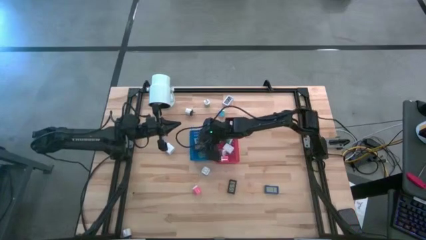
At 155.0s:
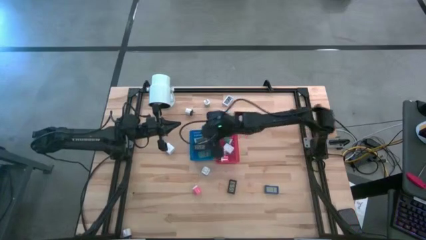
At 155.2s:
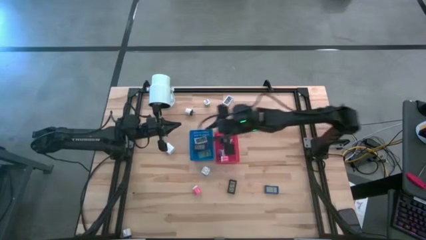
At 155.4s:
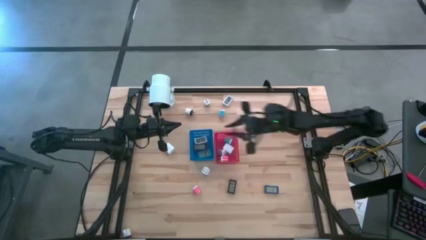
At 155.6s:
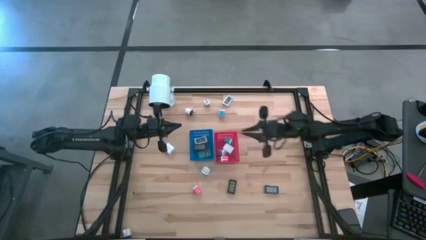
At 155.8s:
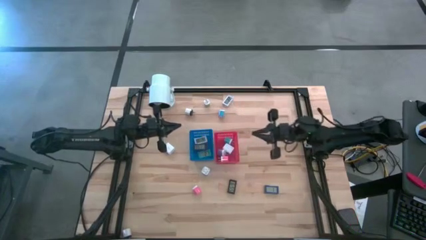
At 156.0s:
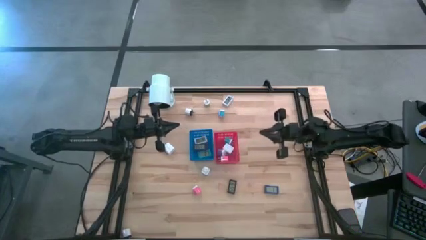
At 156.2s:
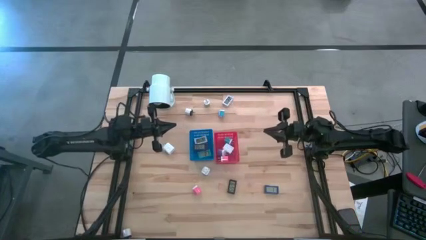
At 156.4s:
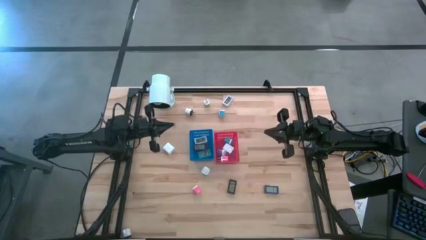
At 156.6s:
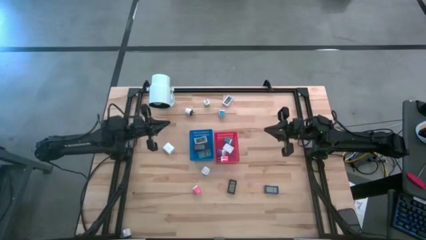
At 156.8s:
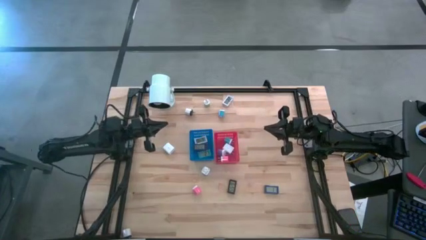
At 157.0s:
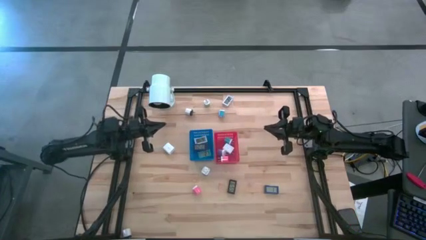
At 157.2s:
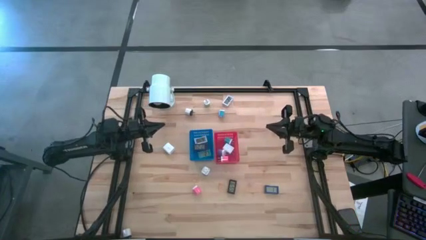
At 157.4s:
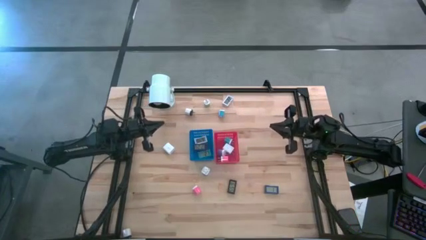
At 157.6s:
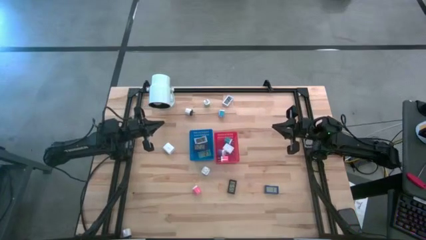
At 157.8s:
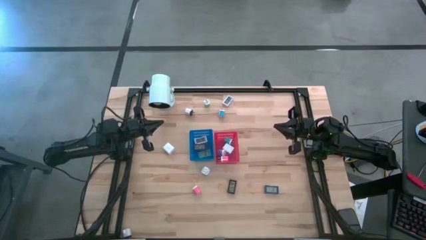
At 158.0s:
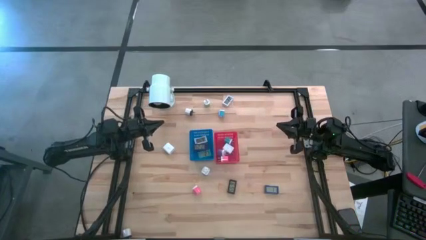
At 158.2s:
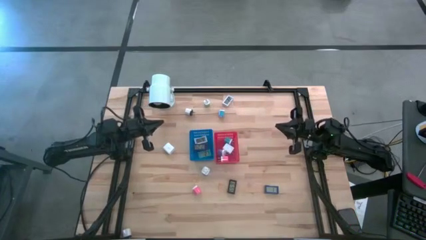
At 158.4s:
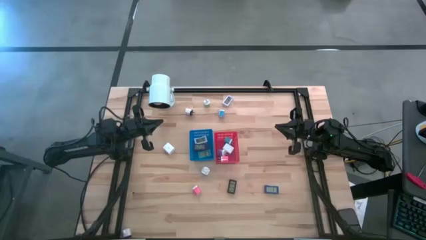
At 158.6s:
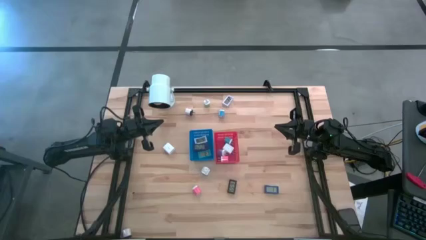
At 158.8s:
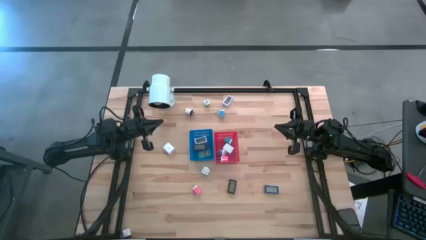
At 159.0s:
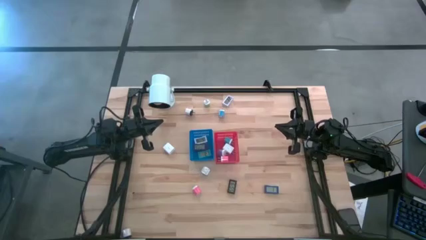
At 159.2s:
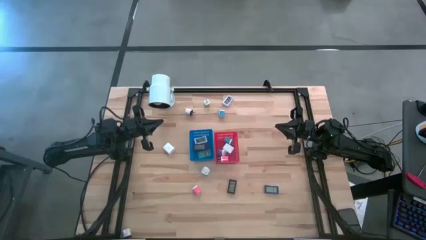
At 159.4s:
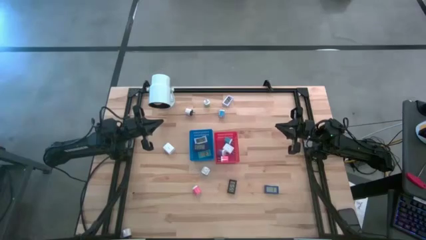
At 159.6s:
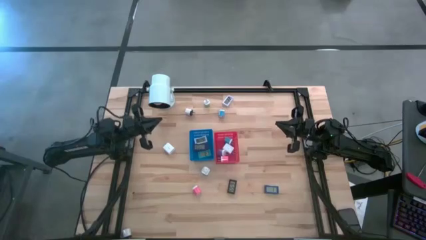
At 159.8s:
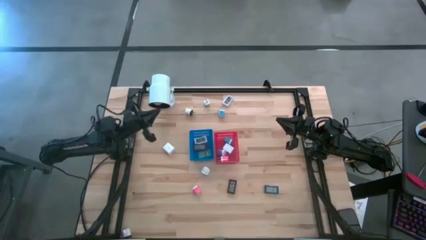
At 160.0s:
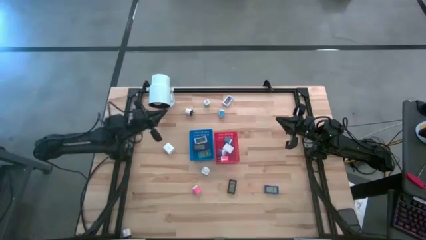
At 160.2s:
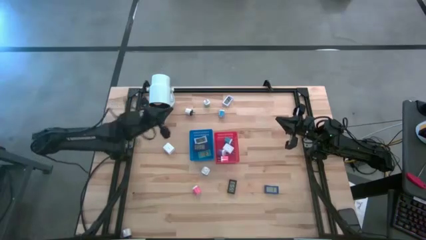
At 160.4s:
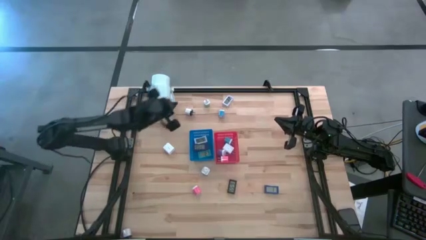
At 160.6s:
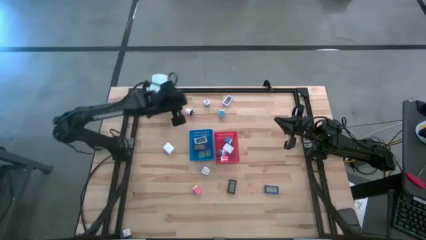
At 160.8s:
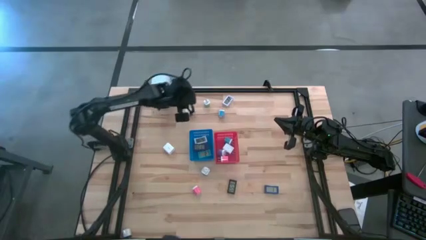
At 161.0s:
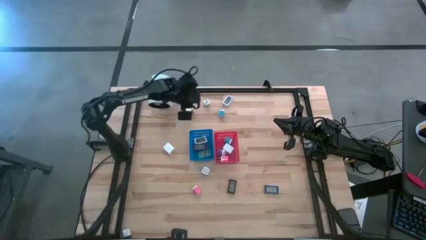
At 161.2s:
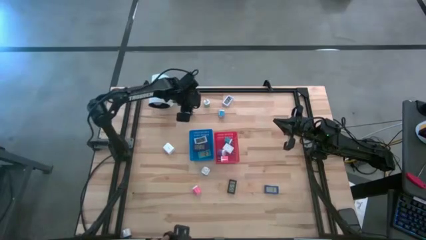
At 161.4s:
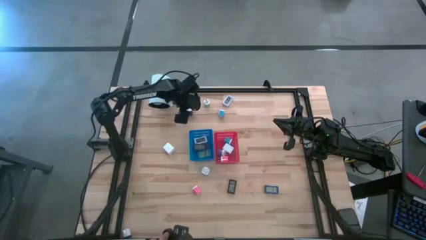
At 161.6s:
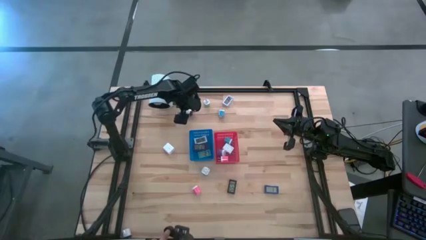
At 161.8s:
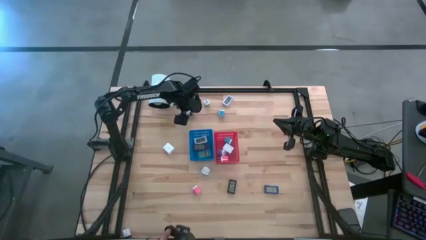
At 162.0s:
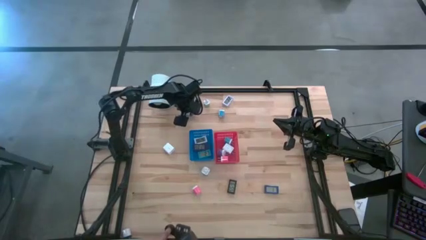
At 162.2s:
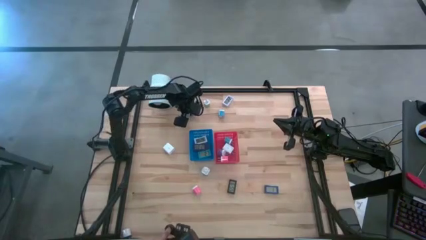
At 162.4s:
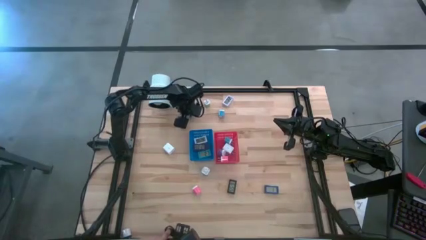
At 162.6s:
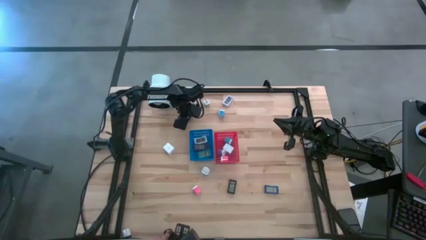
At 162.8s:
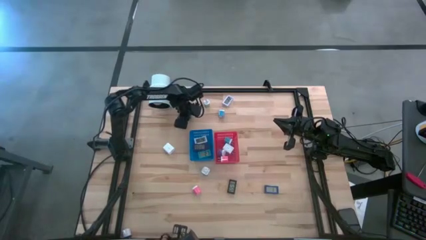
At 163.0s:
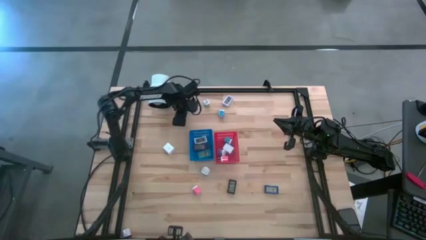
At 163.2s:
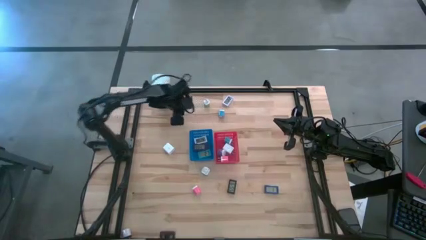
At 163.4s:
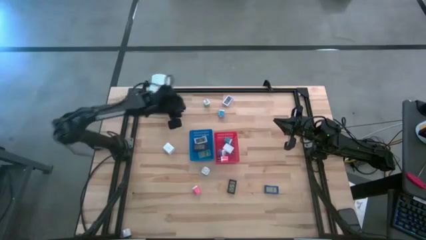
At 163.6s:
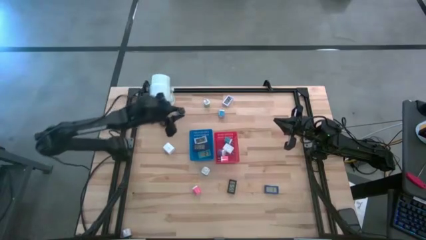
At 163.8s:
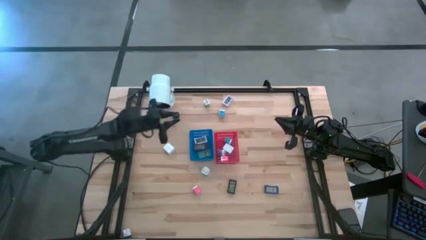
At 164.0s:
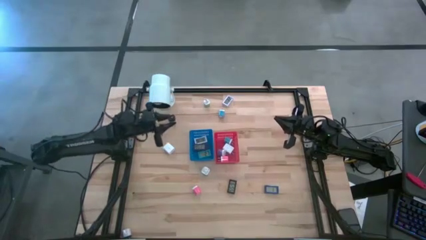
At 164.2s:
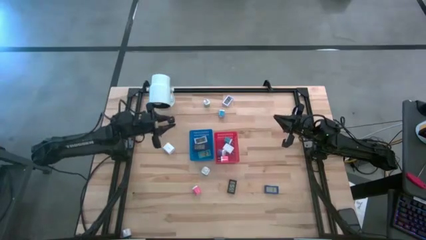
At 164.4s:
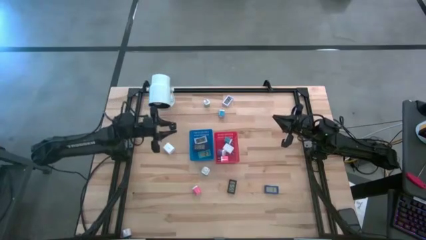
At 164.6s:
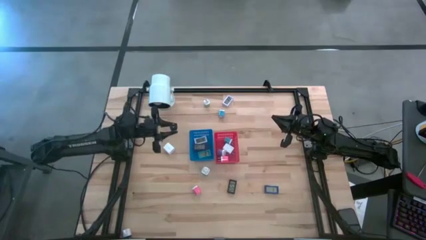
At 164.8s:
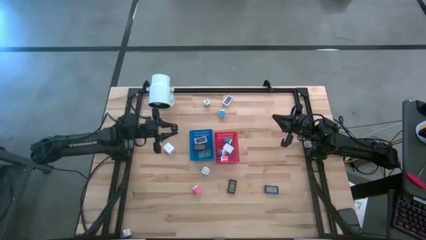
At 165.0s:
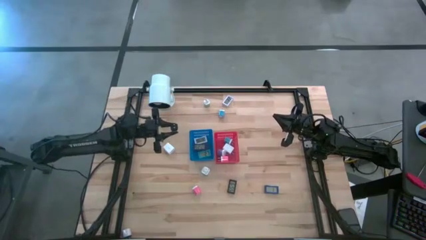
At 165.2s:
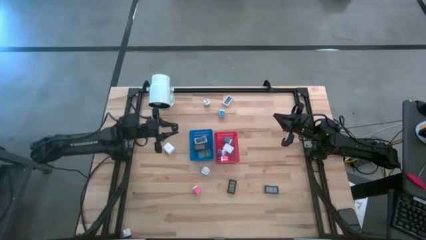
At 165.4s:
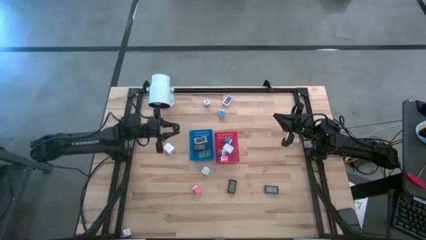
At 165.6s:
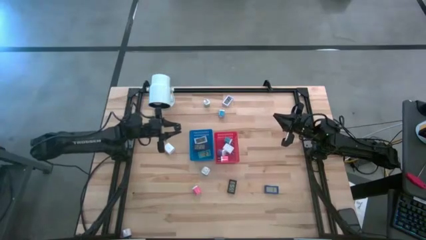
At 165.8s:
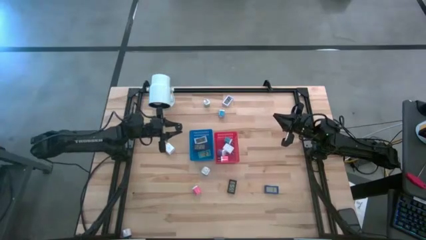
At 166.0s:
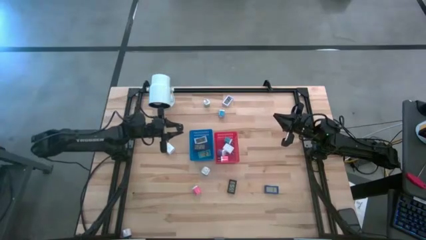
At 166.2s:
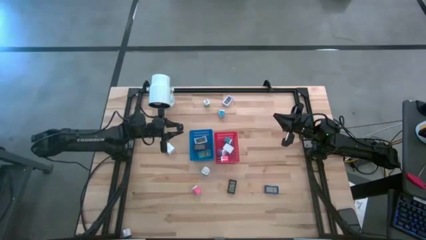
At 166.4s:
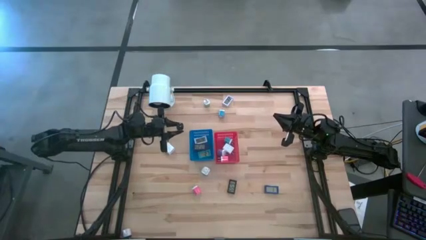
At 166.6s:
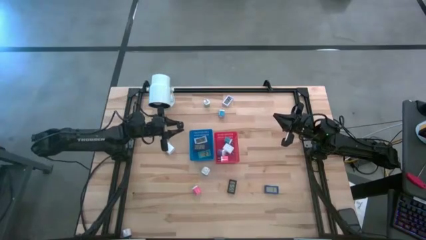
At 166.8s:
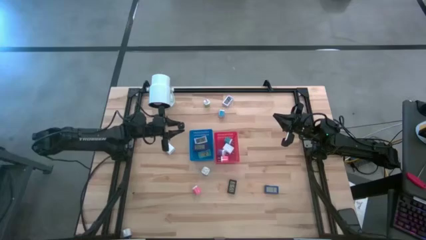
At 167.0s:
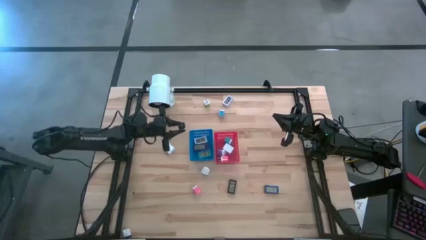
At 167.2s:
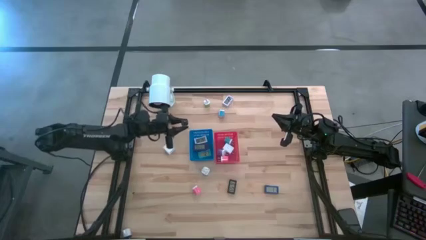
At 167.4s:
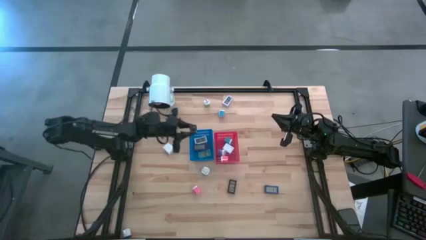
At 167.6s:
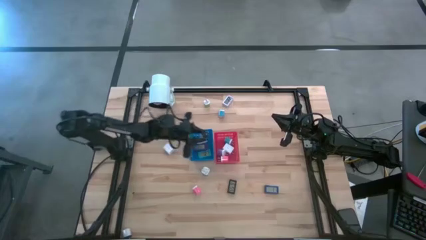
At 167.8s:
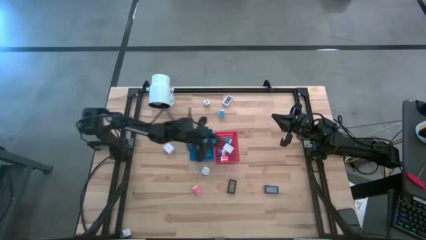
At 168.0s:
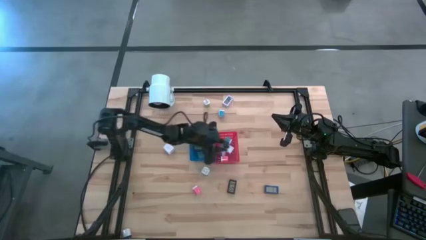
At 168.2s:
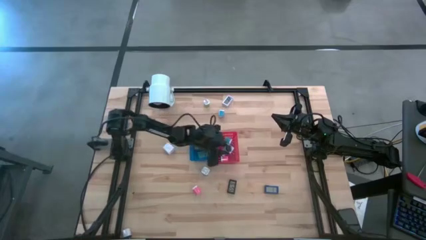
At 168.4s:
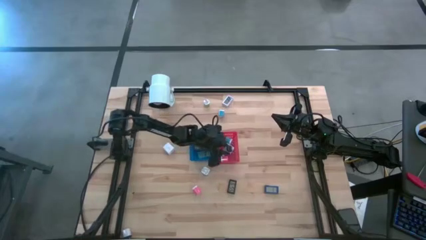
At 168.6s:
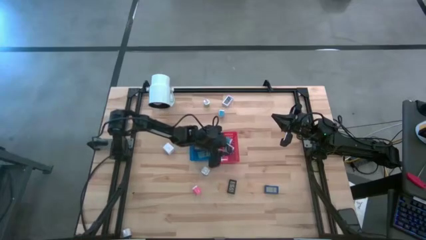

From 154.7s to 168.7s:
Task: Pick & Place Office items
Put the white charger adapter into the red bin

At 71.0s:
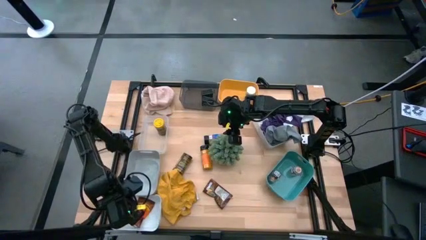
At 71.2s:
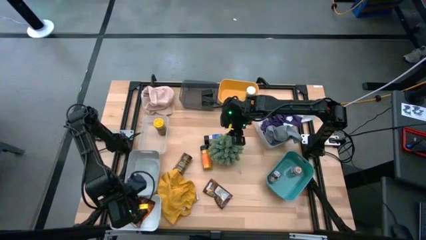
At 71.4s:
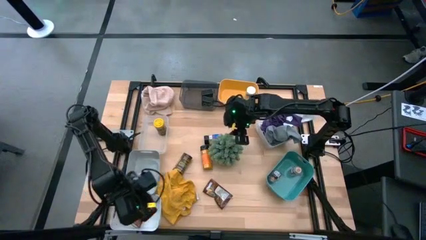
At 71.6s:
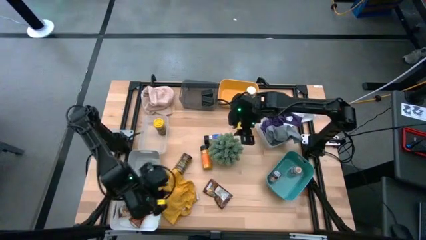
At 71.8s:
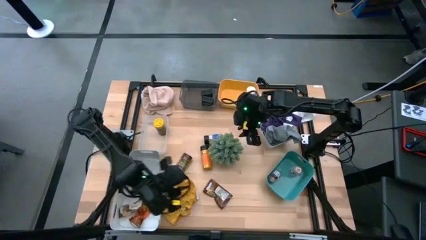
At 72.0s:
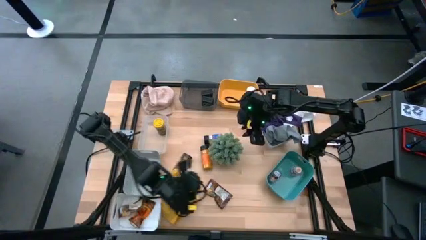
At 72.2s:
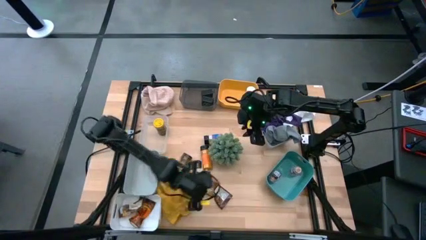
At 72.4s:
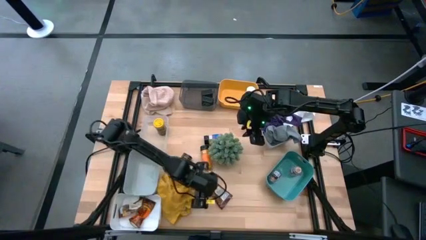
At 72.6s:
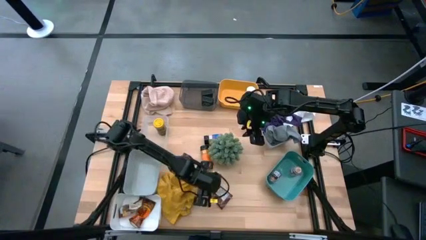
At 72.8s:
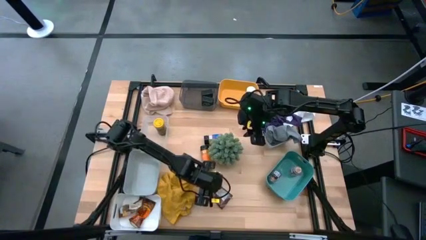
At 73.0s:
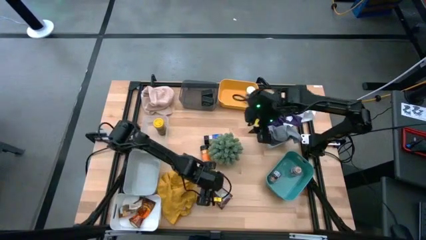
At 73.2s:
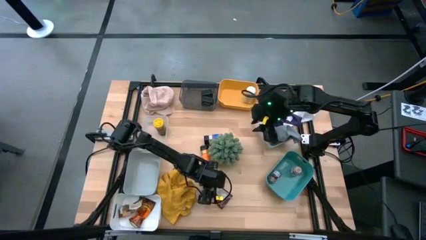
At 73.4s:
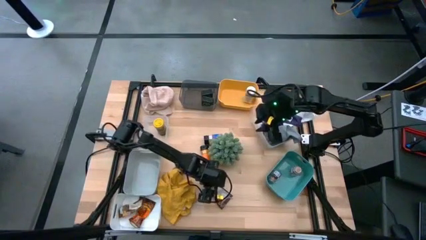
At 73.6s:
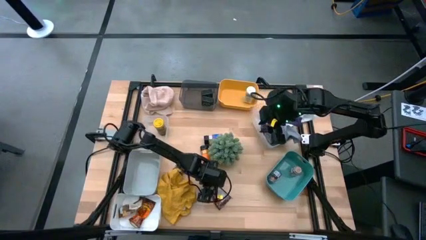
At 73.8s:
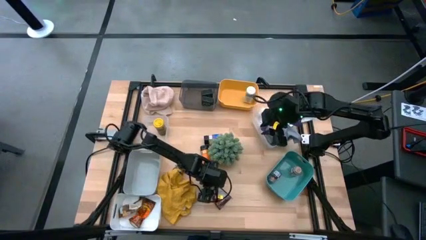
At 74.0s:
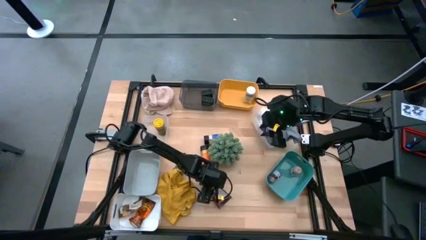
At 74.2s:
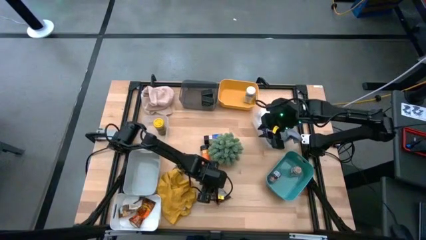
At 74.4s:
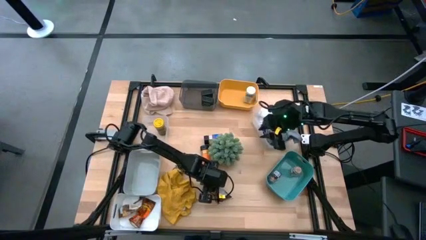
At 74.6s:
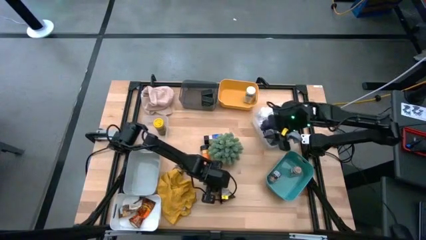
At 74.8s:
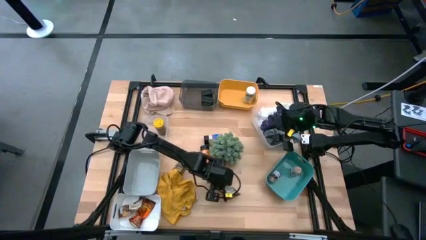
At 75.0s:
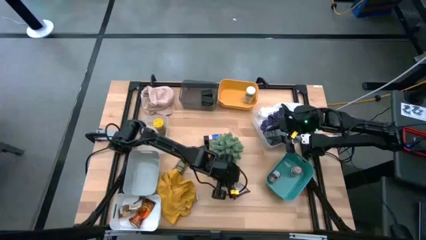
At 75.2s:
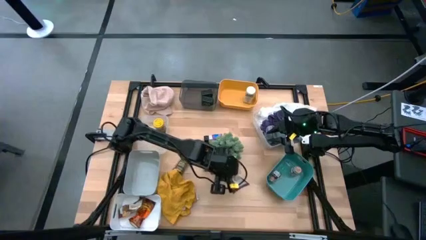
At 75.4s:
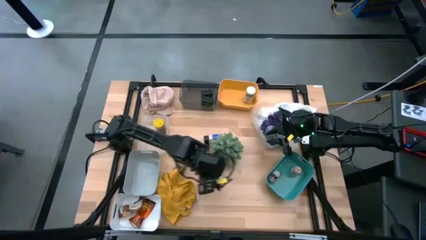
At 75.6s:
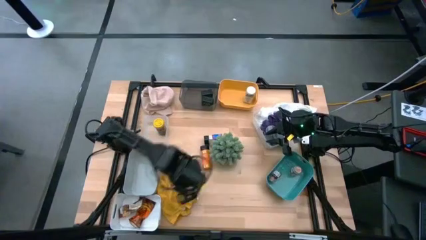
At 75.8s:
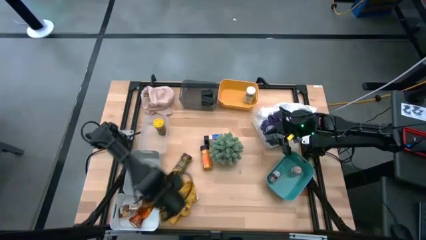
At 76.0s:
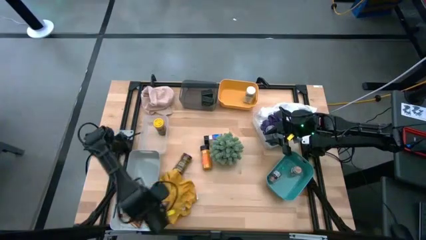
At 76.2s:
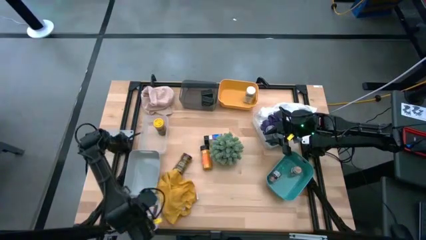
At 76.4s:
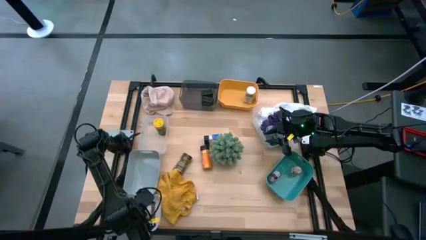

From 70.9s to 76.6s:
Task: Sort spices by type
Put the orange spice pack into the bottom white bin
